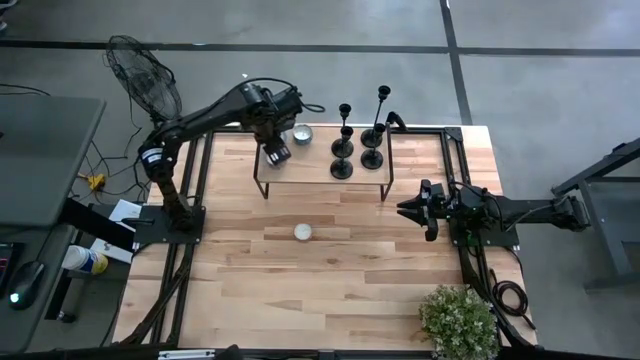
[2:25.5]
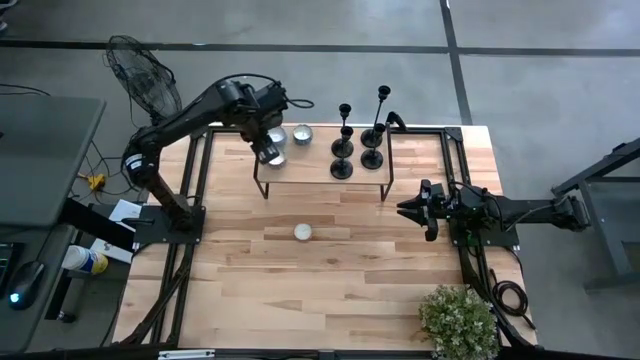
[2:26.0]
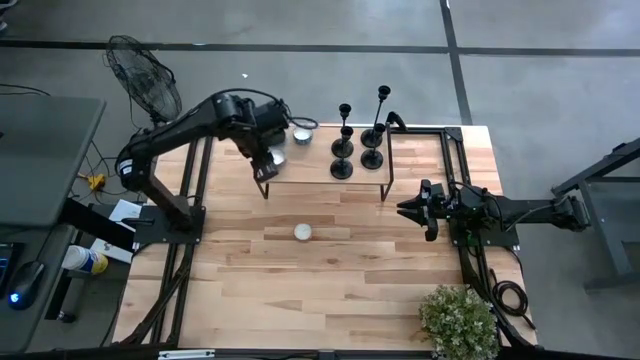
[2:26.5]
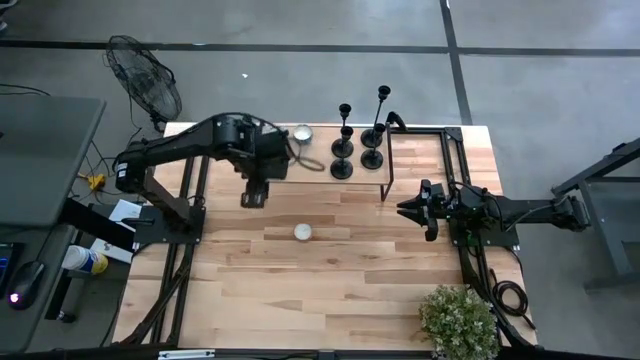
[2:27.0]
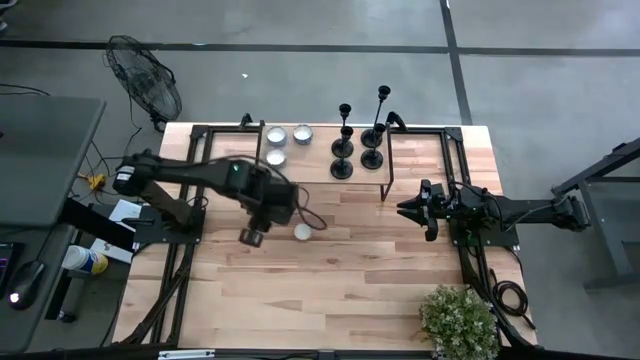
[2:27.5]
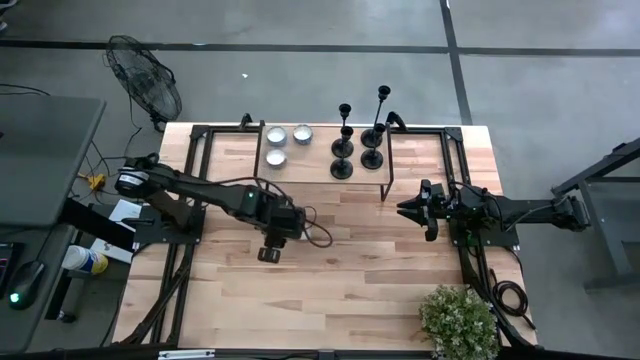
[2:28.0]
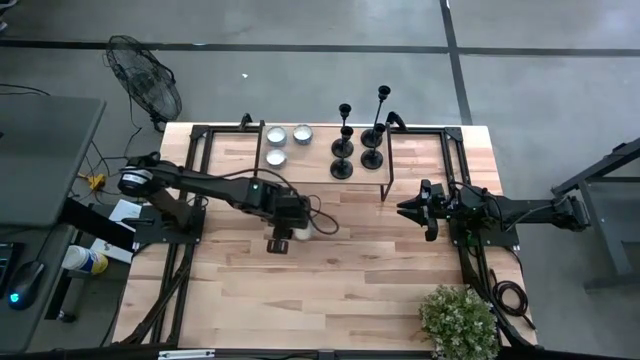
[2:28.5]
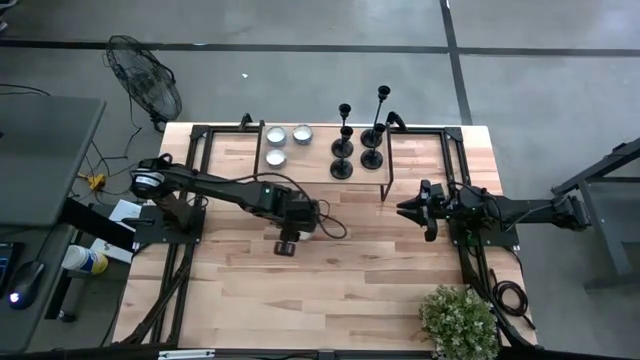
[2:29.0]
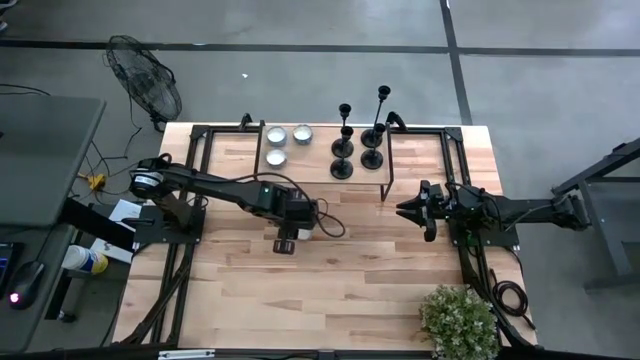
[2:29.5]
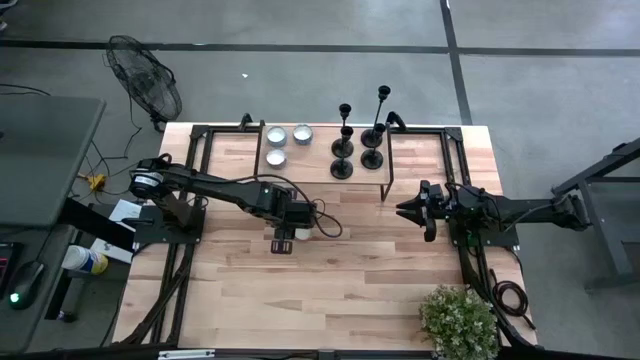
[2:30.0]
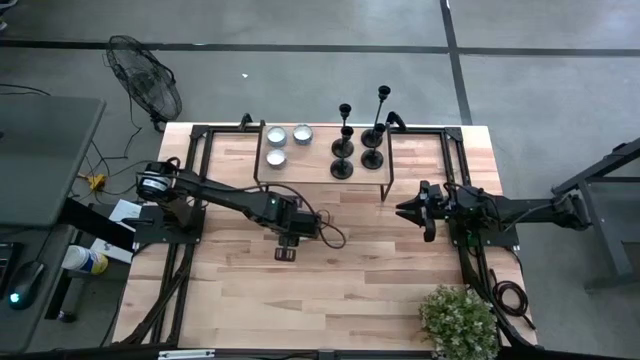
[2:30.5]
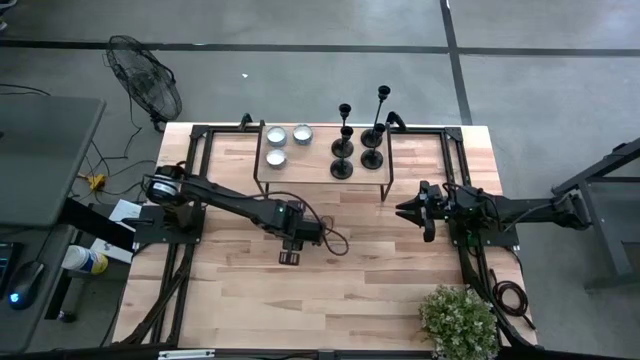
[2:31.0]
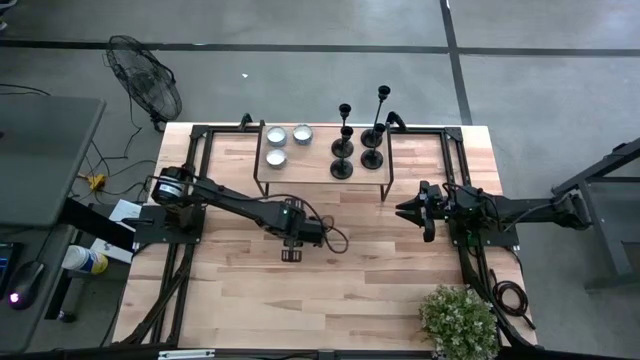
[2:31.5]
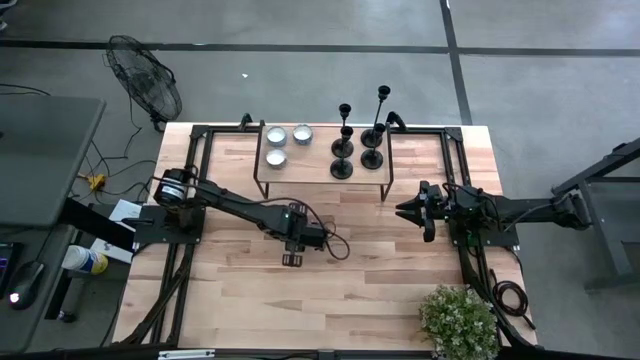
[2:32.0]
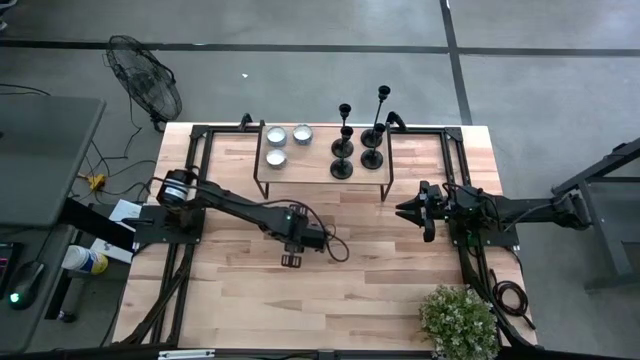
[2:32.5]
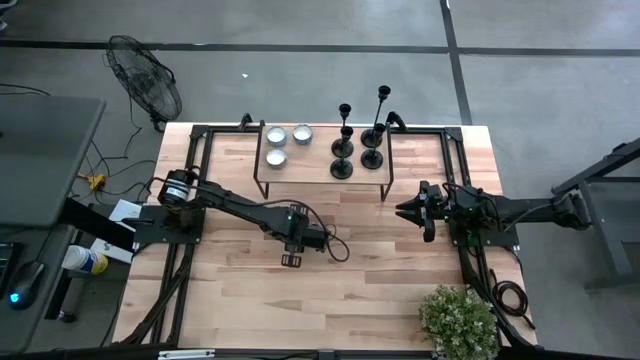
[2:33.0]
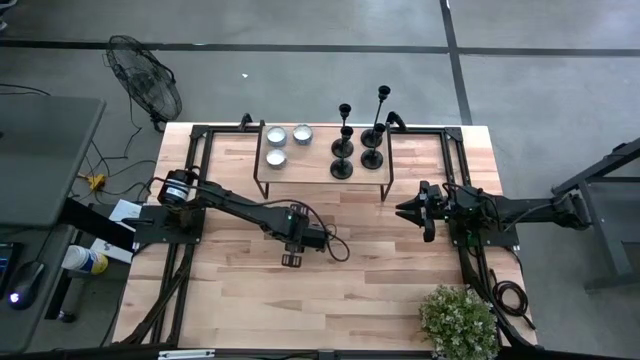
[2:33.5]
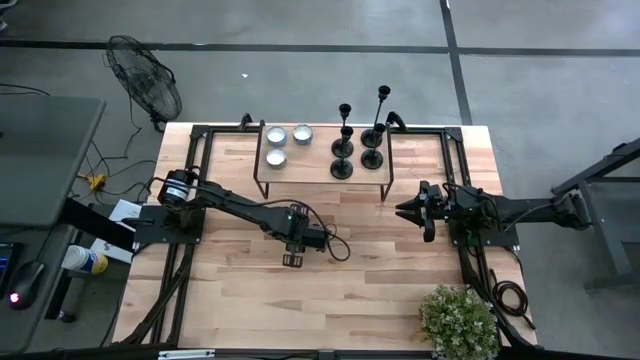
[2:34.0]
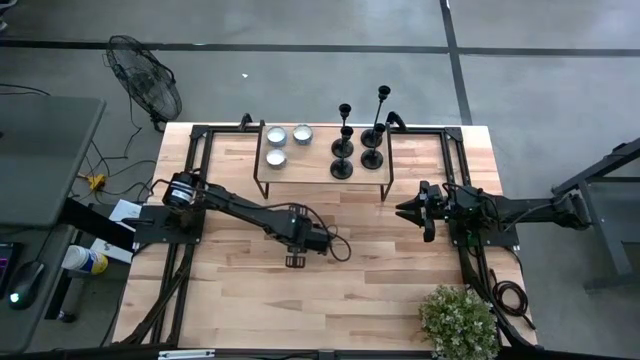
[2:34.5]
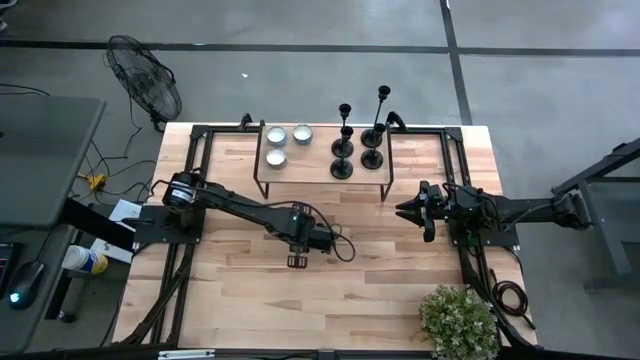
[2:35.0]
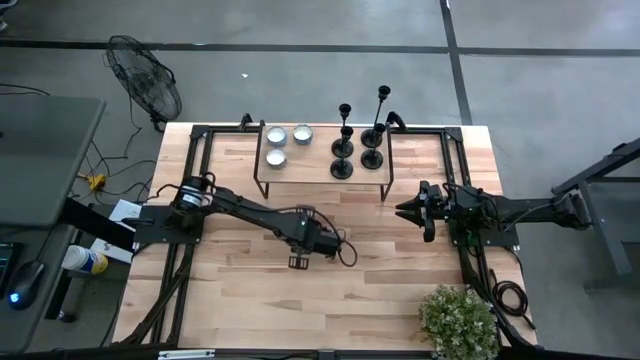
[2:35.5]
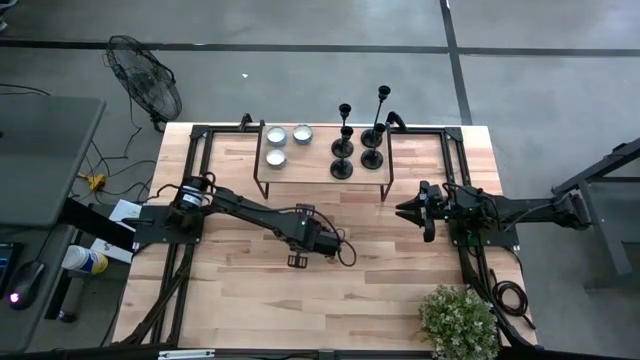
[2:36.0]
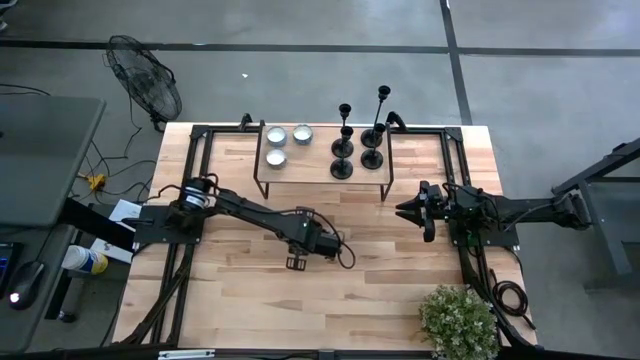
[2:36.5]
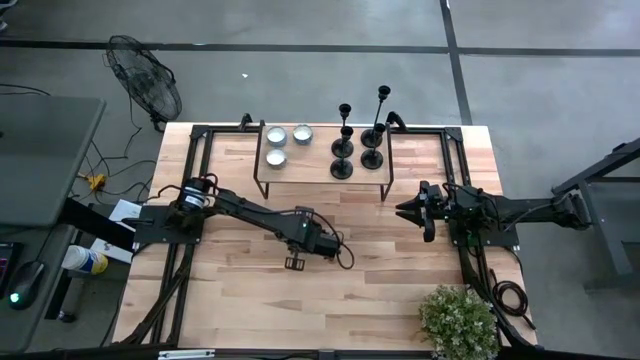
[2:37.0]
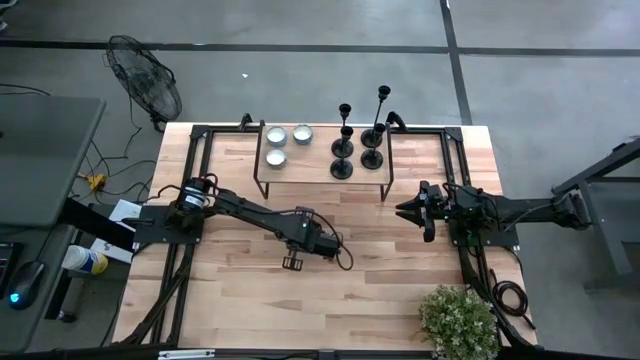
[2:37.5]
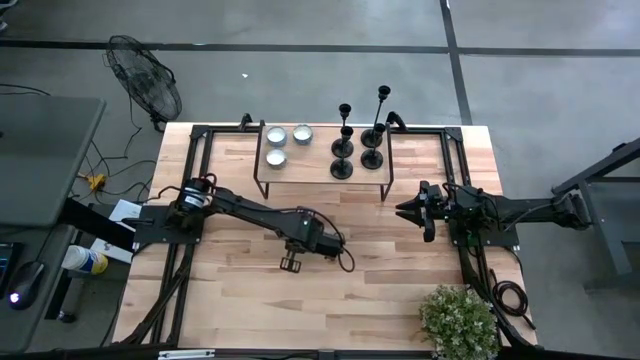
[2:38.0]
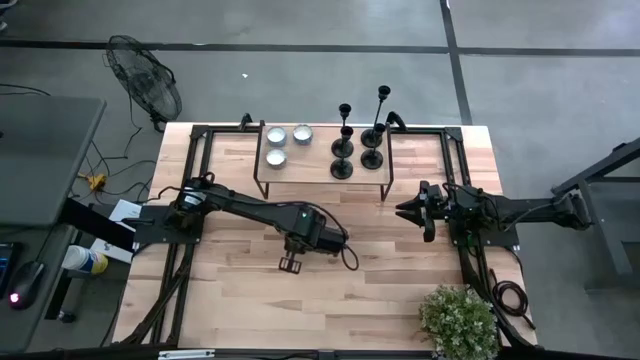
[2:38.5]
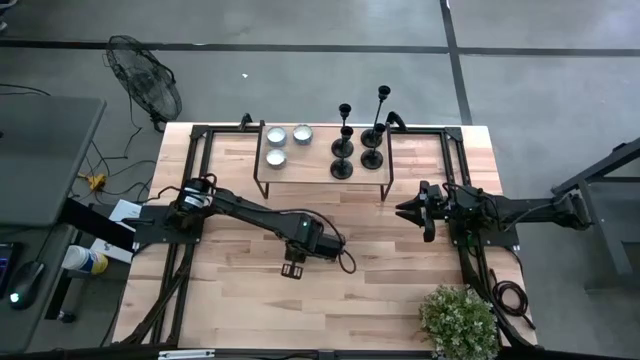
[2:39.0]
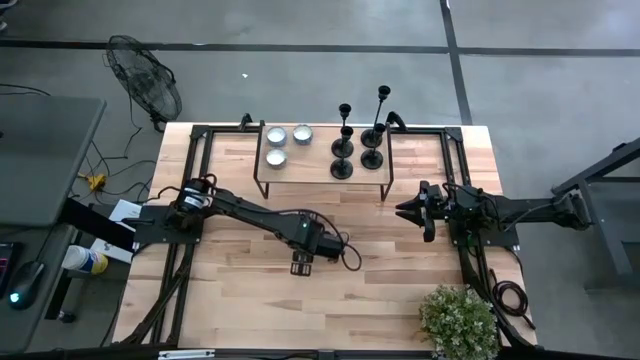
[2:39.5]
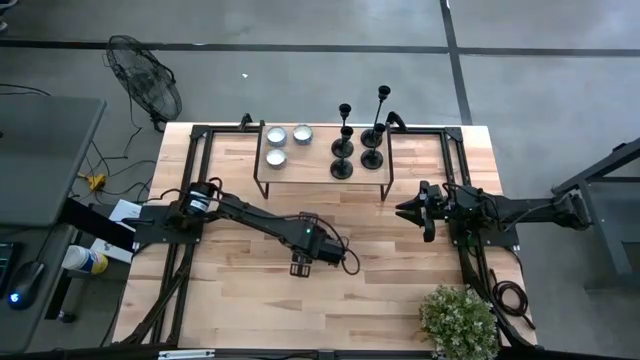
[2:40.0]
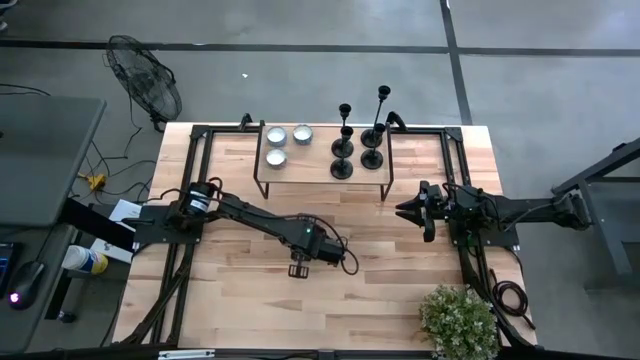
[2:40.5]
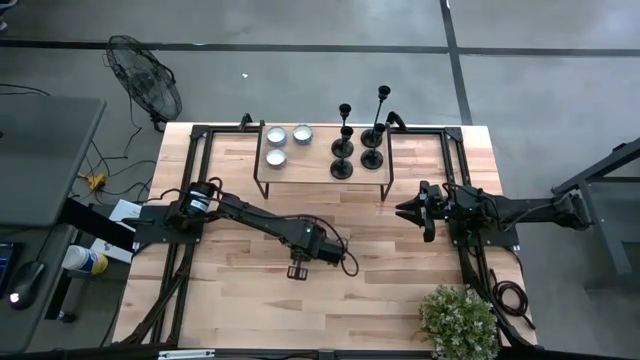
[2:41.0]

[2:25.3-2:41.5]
Task: Pick & Place candle stick holders
Put the yellow scented candle on the shelf and align it with the blue scented candle

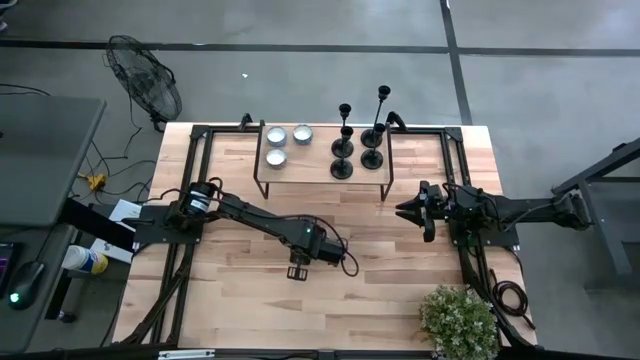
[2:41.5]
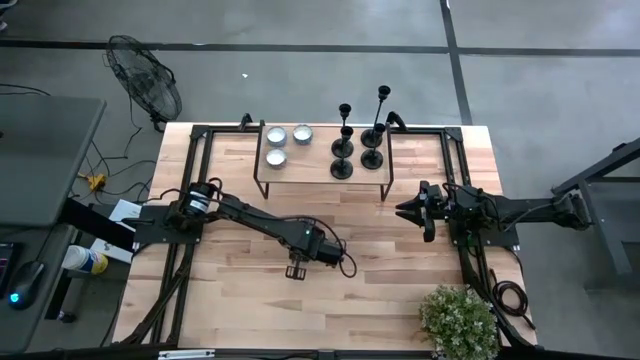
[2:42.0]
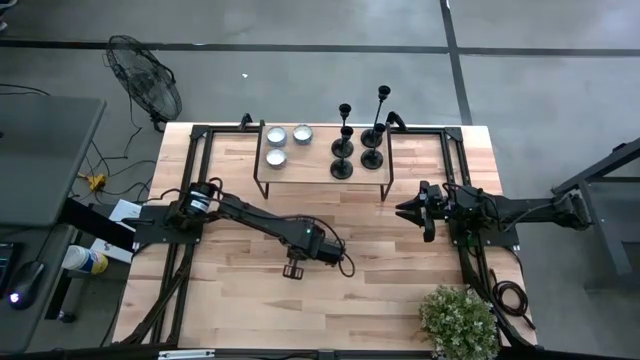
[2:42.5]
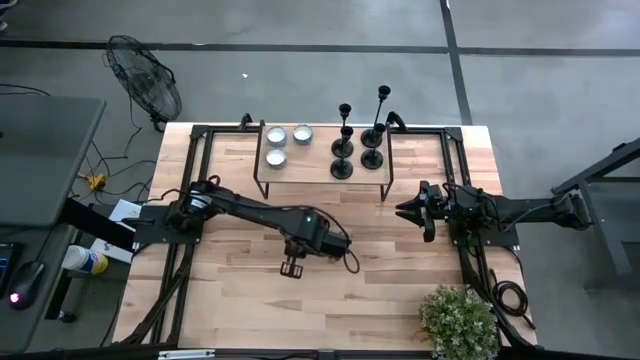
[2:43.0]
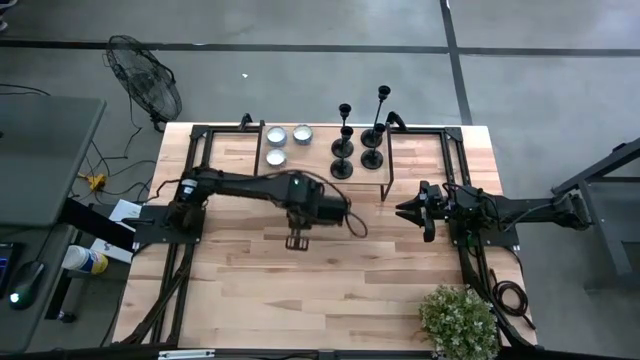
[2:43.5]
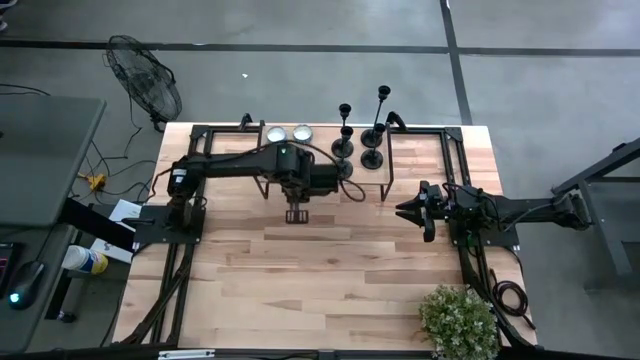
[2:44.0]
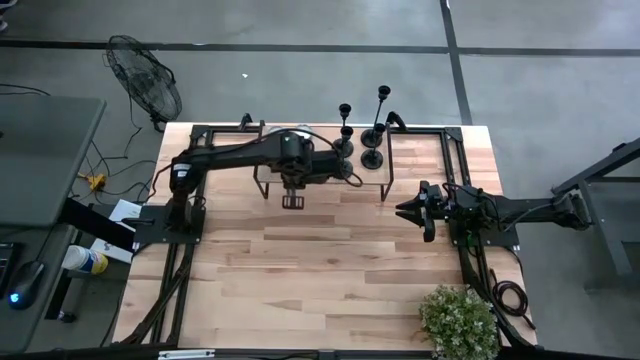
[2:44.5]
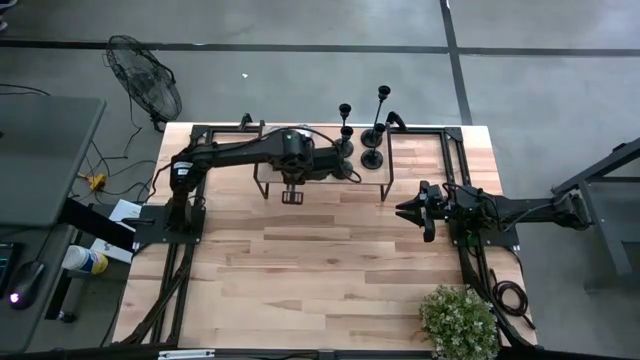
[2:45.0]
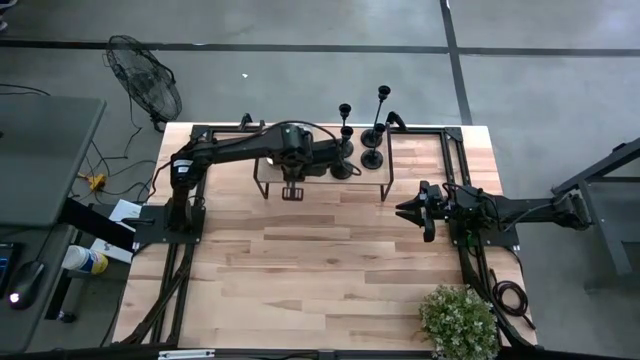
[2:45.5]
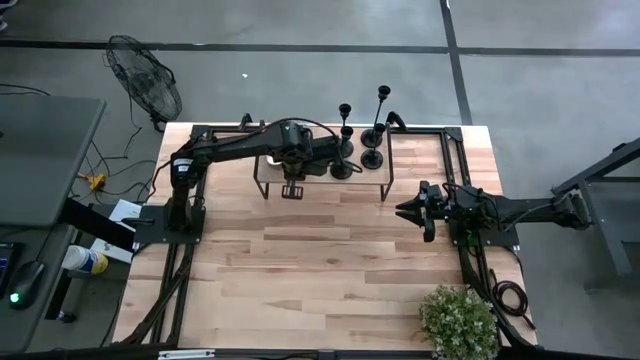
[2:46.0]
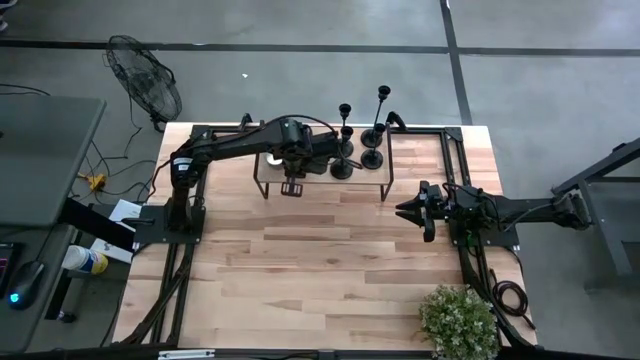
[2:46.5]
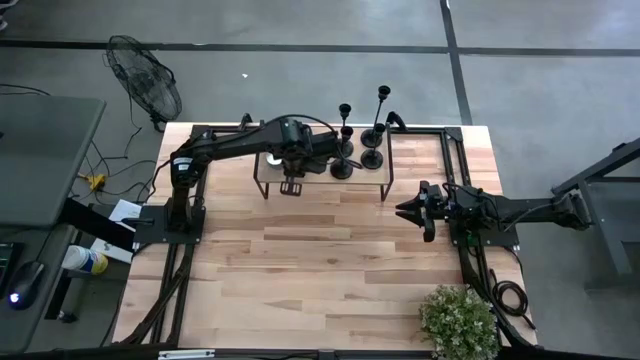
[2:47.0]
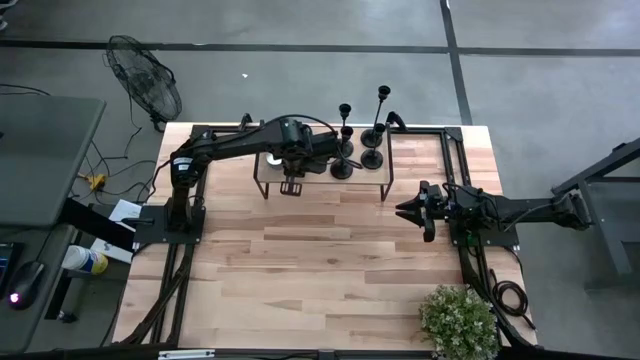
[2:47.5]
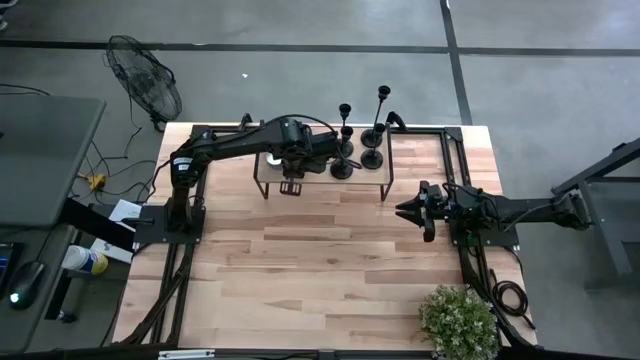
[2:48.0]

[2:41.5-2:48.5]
Put the yellow scented candle on the shelf and align it with the blue scented candle
